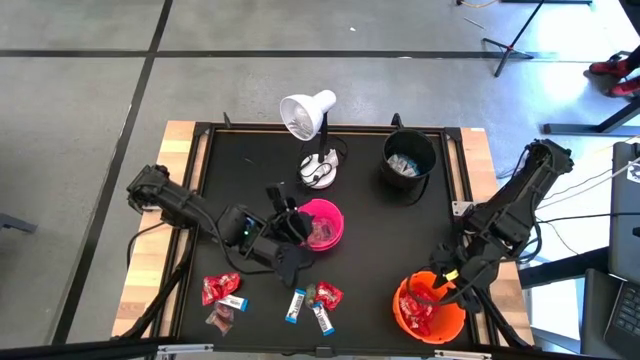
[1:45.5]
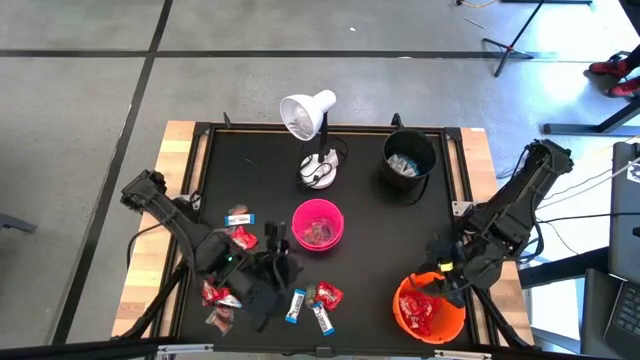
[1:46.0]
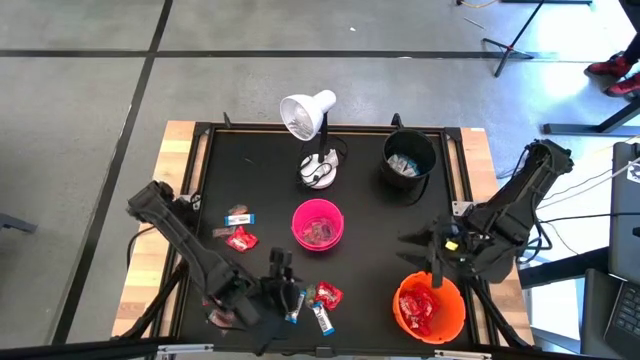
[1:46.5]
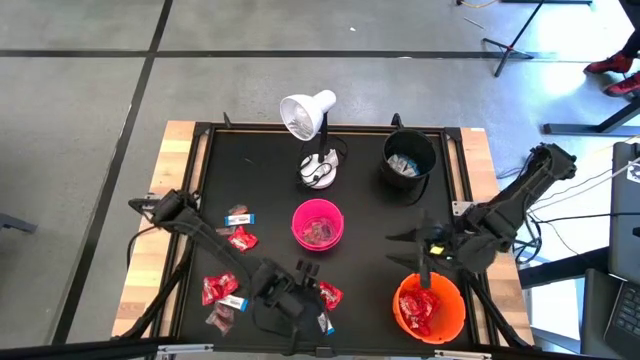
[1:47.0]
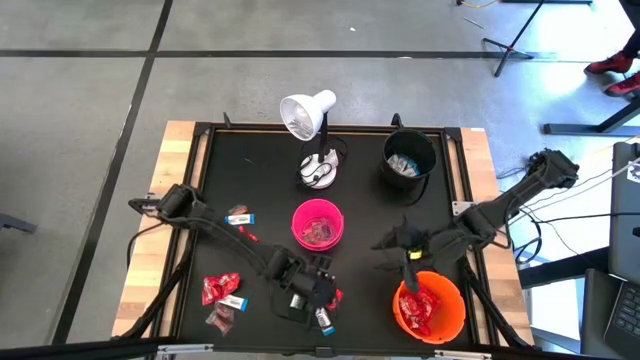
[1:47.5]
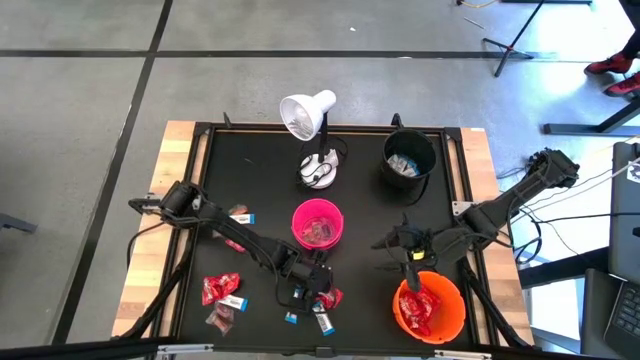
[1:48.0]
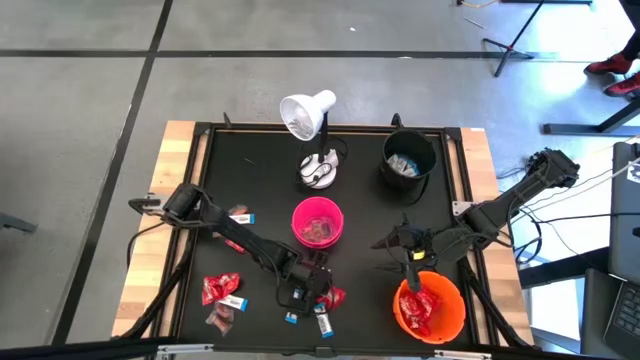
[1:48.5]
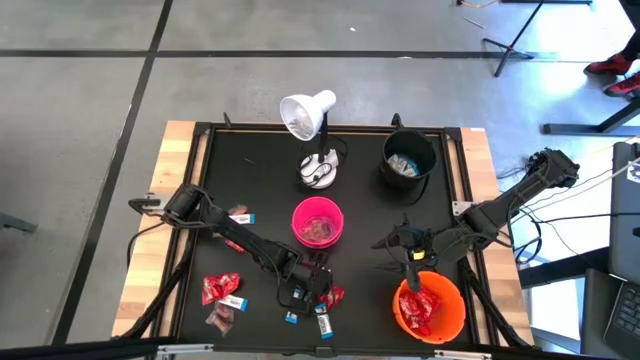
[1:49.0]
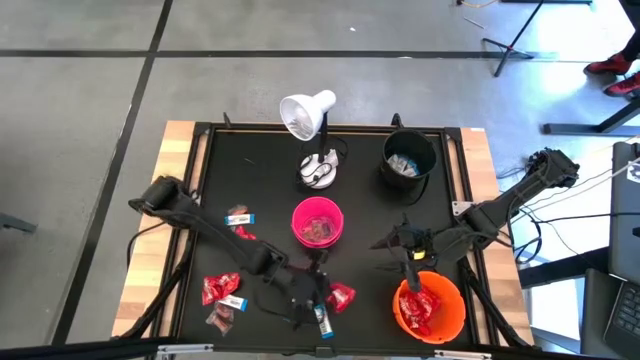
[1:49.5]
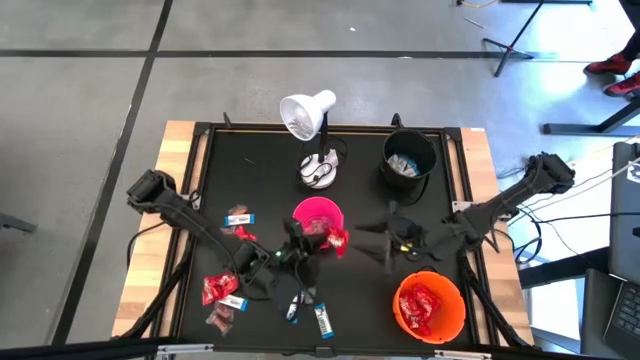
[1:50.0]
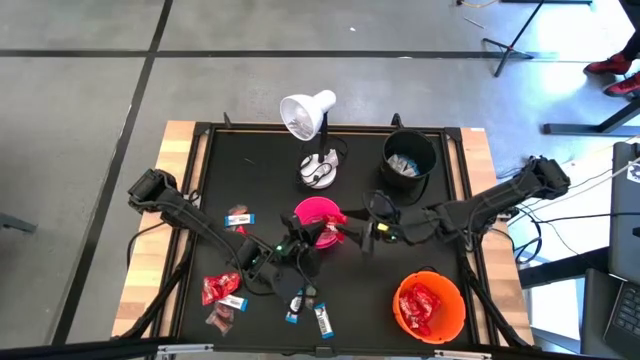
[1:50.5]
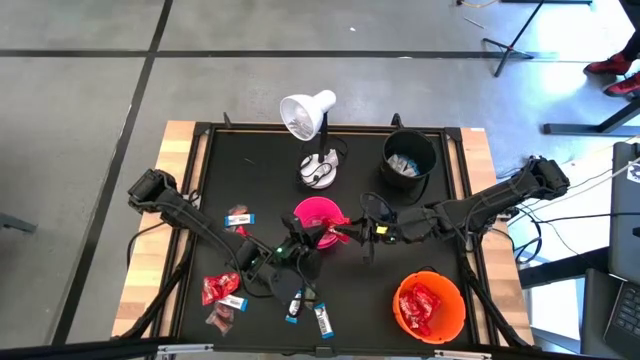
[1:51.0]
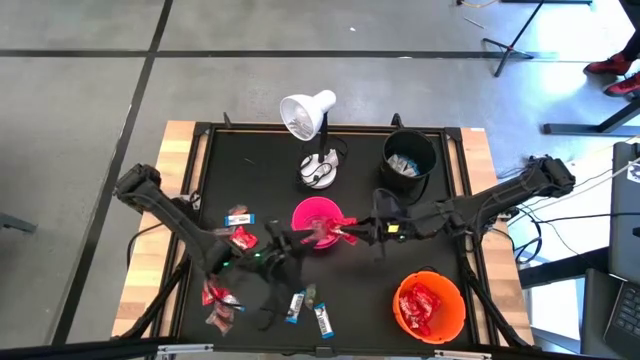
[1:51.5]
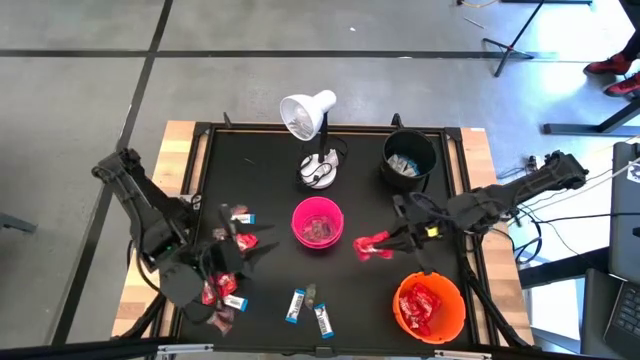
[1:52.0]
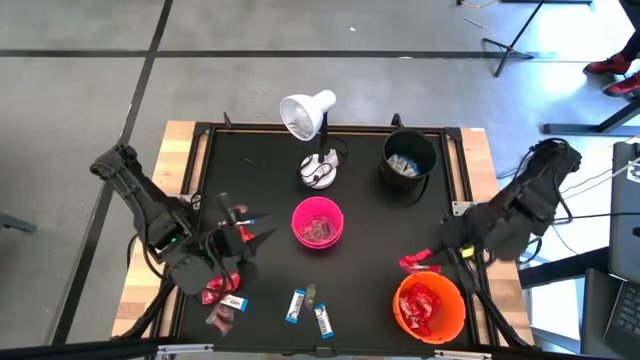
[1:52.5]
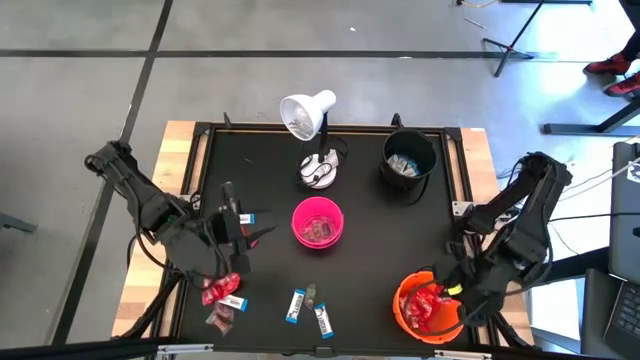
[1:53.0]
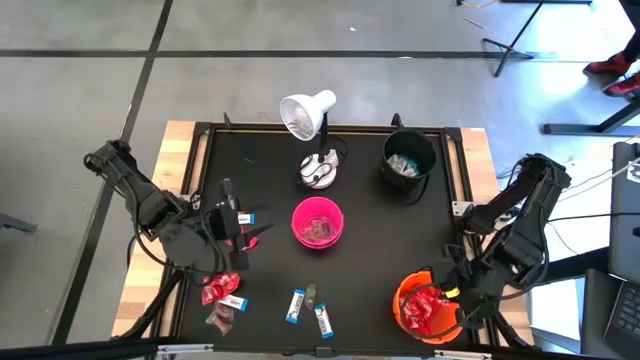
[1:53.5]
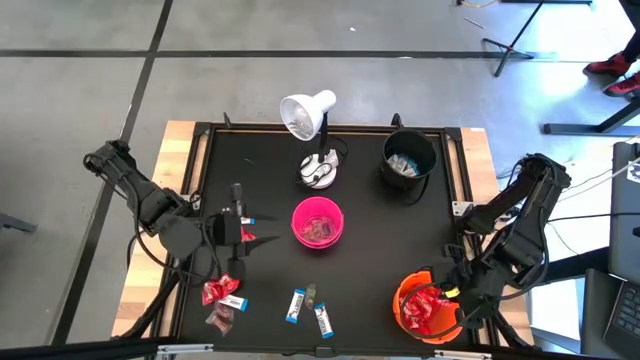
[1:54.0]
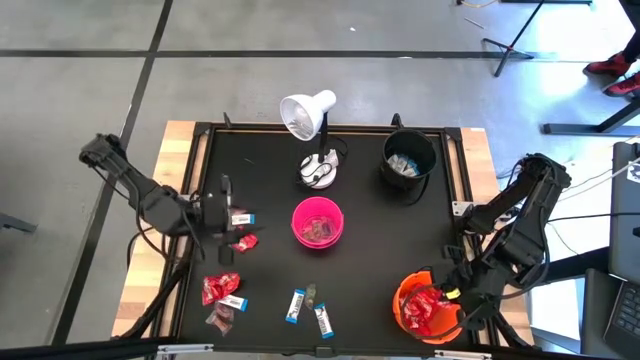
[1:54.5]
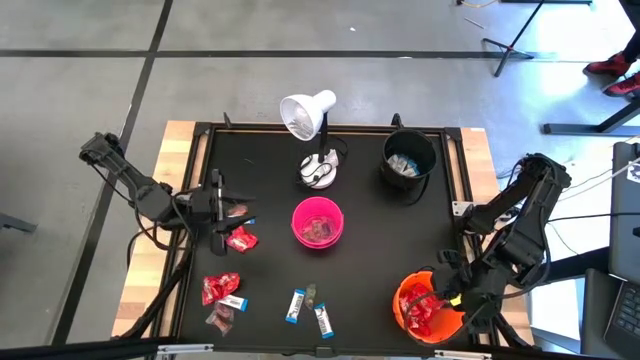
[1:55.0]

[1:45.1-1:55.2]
Task: Sort candy
Put the red candy into the orange bucket

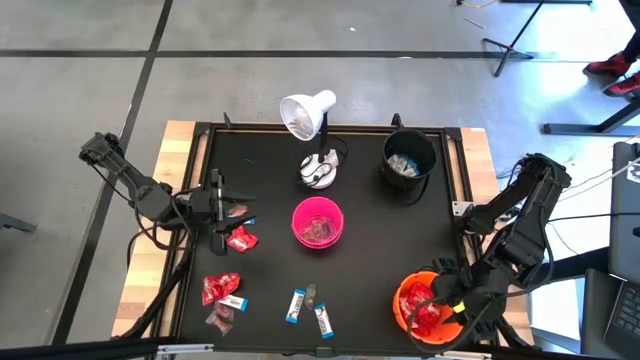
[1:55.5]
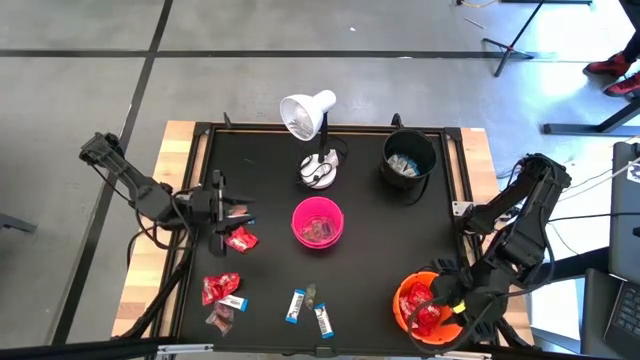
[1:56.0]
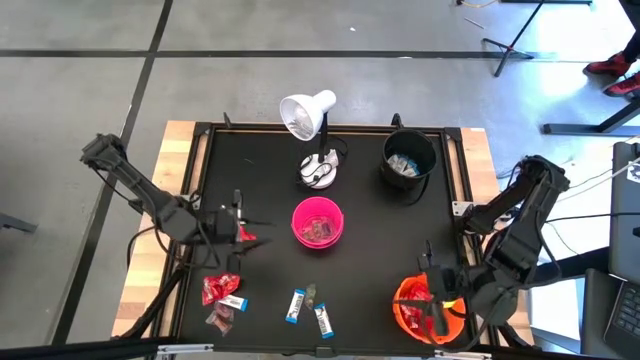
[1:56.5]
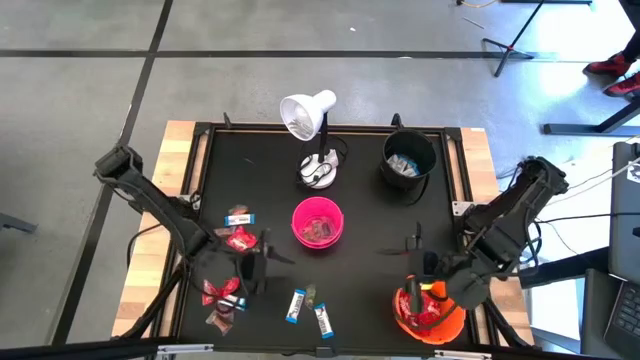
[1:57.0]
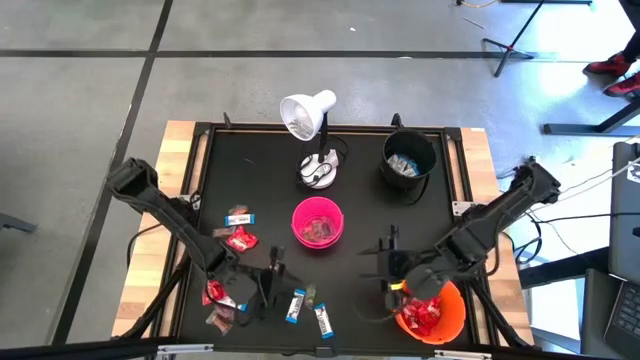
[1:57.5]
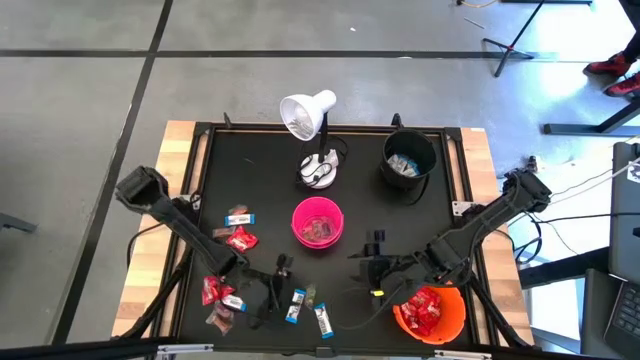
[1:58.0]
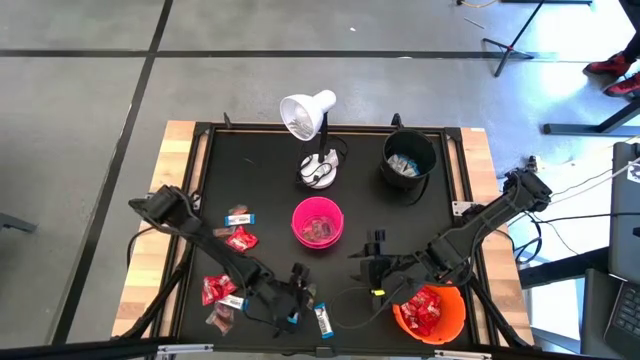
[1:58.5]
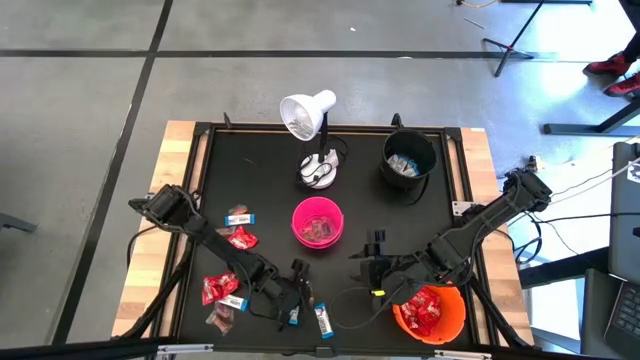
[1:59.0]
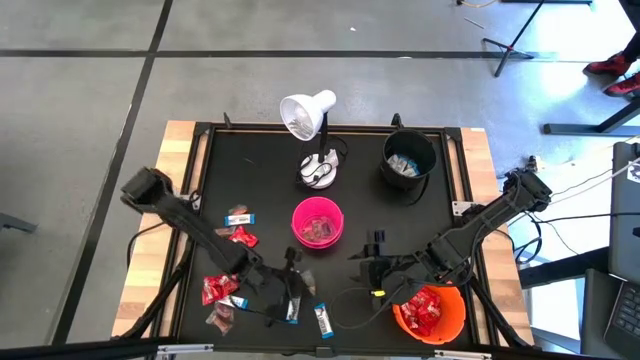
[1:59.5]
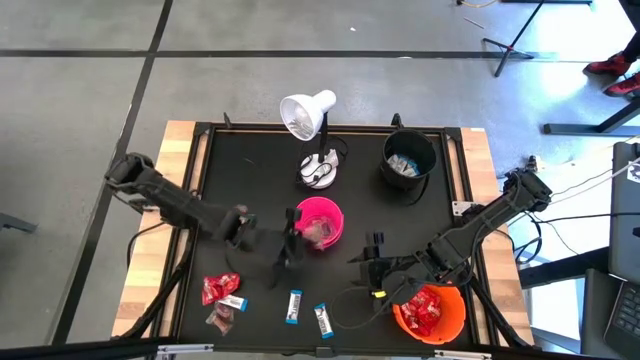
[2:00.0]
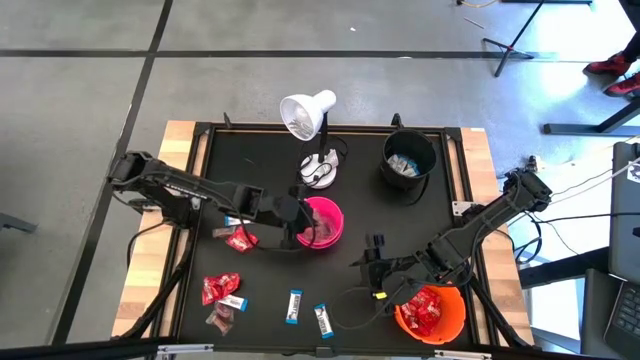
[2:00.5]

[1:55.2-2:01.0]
Put the green gummy into the pink bucket

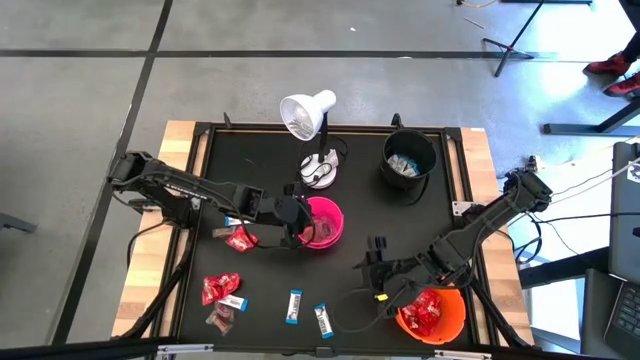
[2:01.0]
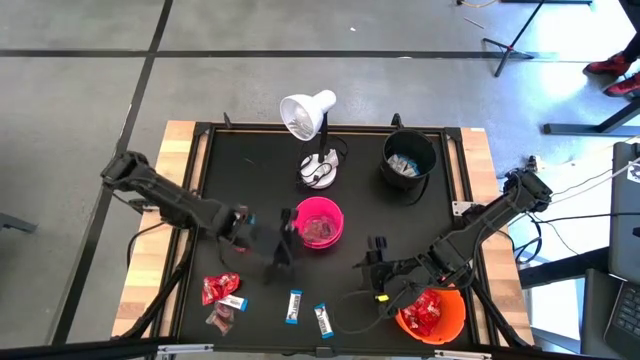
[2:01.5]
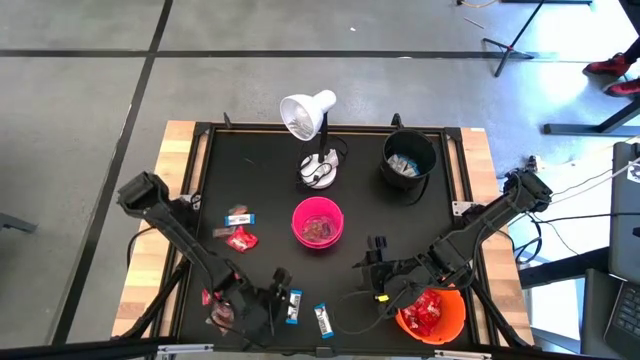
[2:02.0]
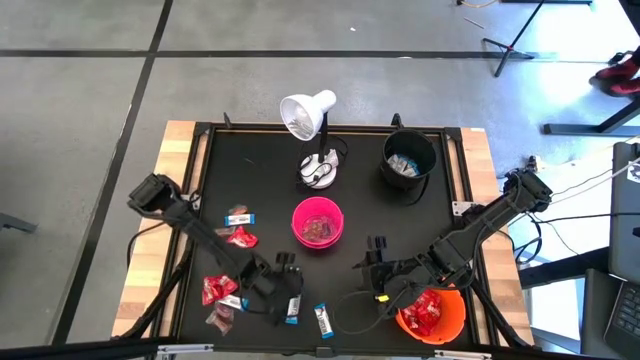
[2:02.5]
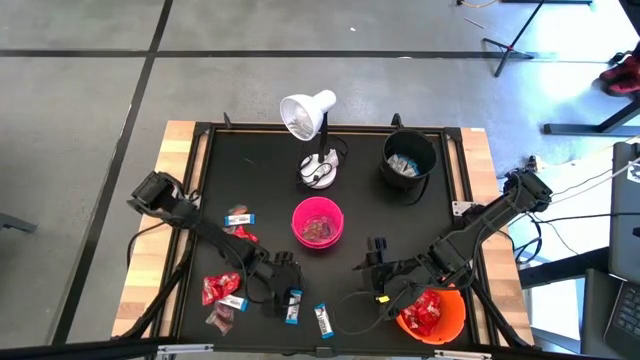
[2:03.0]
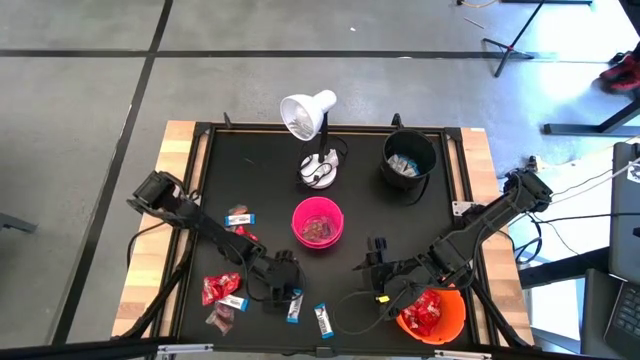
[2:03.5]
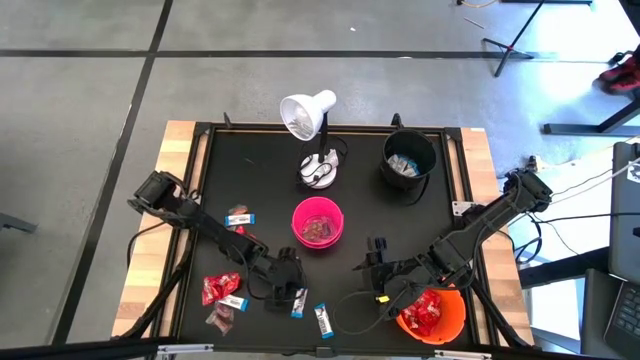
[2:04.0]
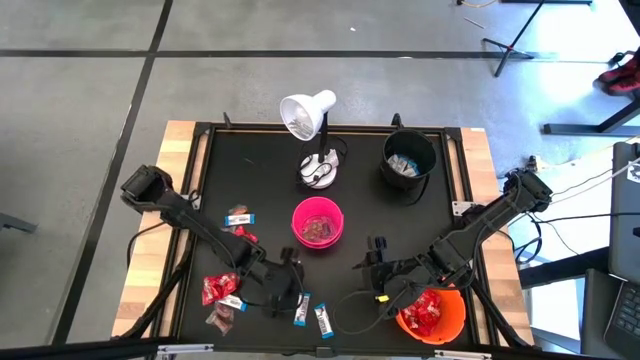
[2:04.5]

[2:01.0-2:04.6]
Put the white chocolate bar into the black bucket

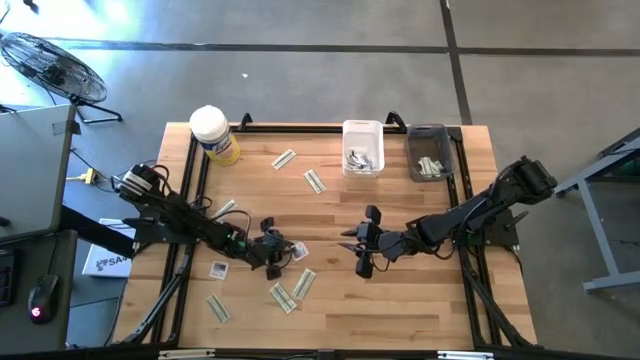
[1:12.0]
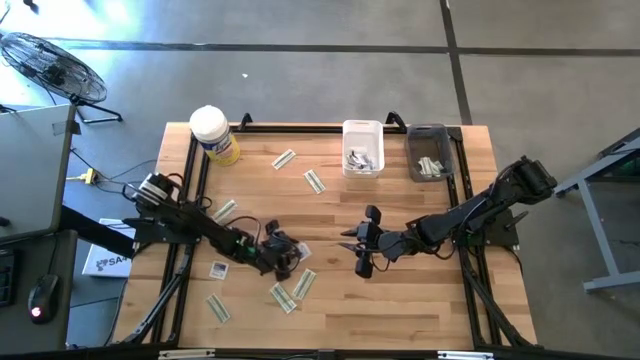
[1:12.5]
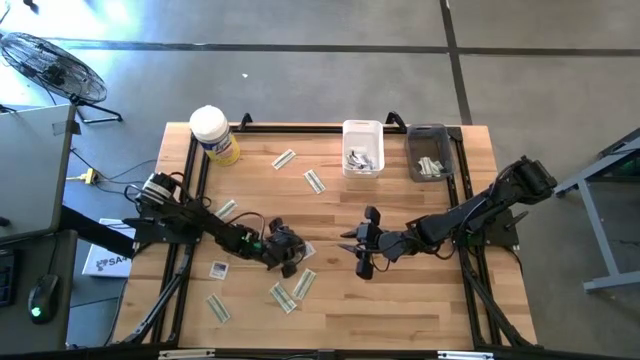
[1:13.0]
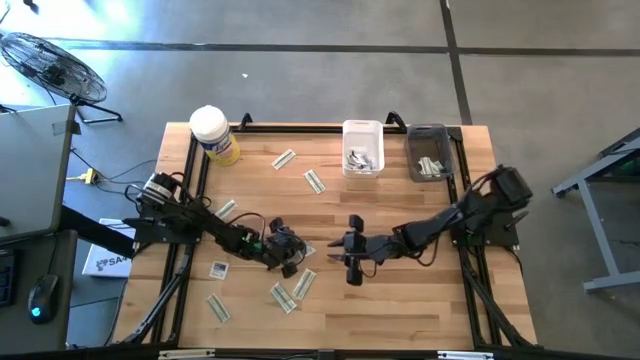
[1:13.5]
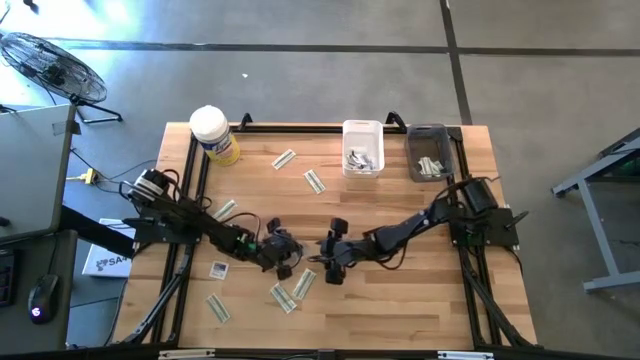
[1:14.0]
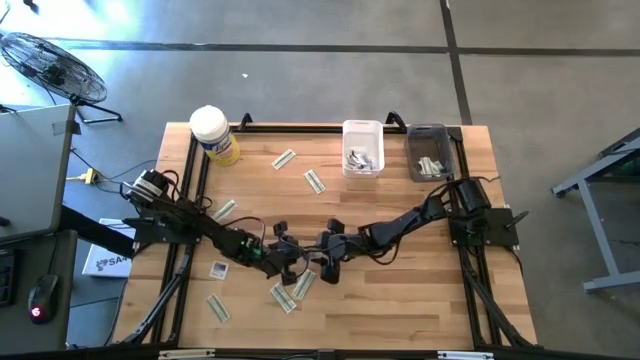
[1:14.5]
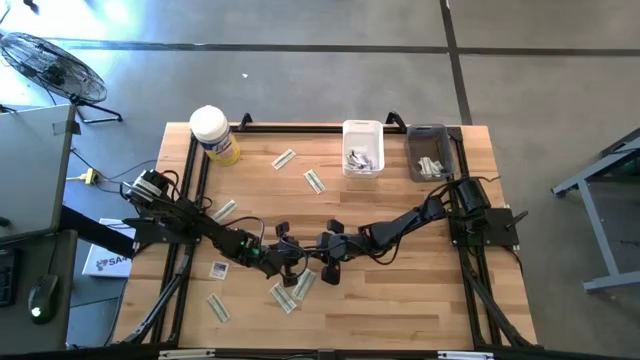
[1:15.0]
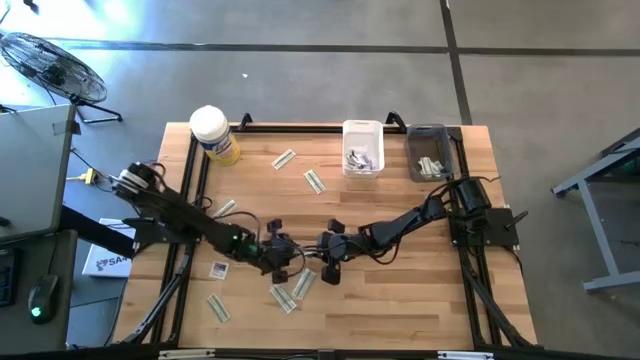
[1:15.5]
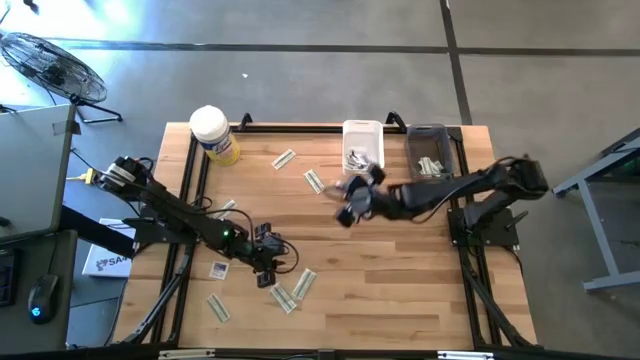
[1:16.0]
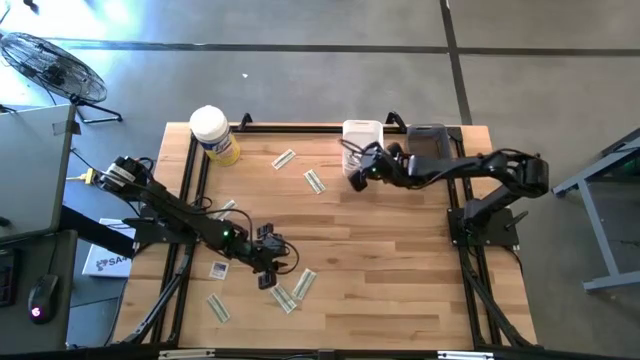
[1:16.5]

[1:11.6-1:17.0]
Task: Pick & Place First Aid Supplies
Put the blue alcohol pad into the white bin
